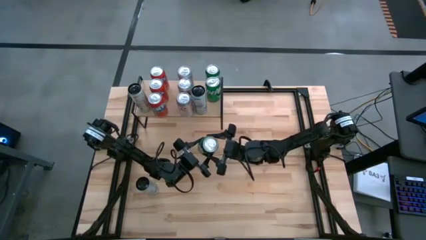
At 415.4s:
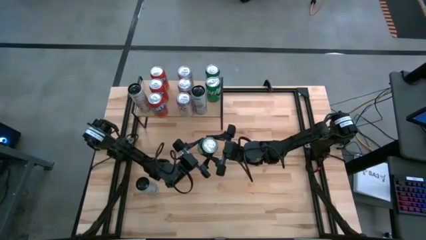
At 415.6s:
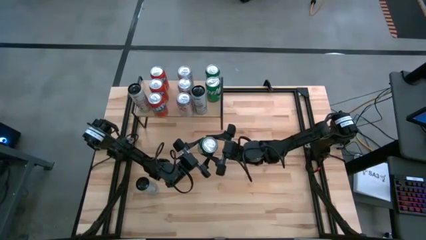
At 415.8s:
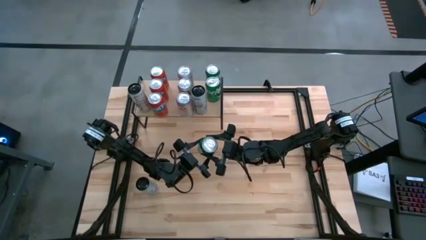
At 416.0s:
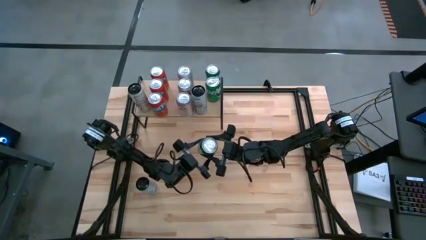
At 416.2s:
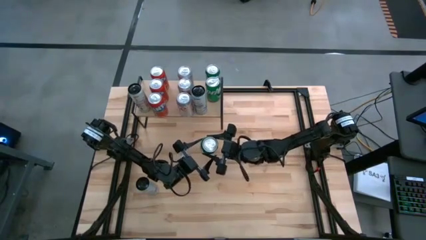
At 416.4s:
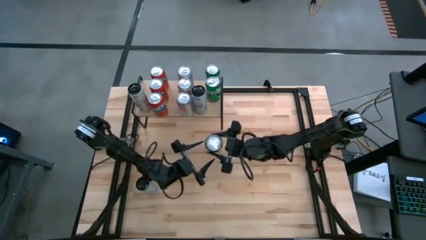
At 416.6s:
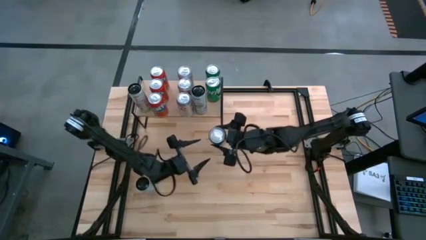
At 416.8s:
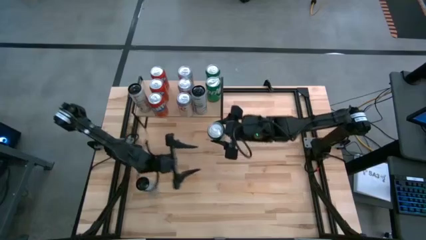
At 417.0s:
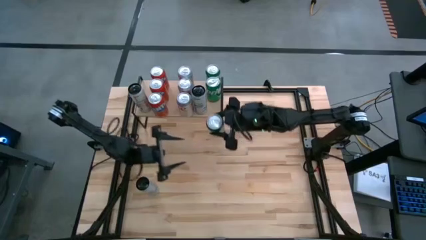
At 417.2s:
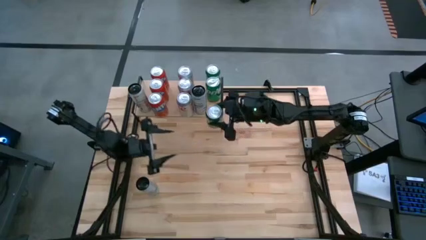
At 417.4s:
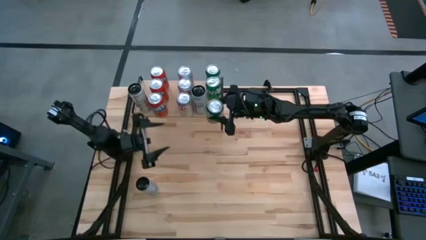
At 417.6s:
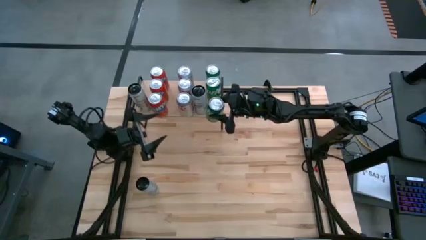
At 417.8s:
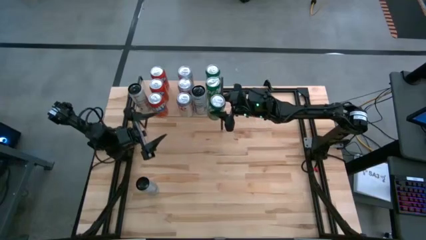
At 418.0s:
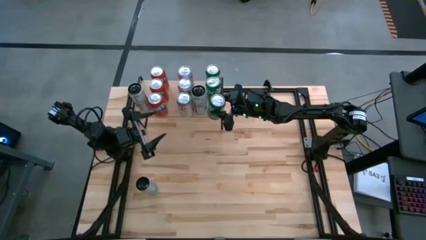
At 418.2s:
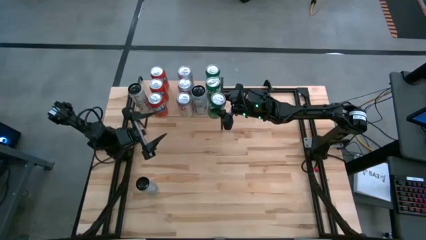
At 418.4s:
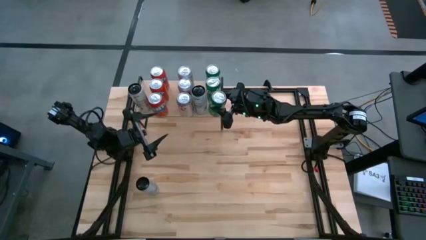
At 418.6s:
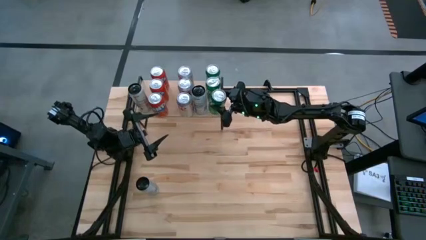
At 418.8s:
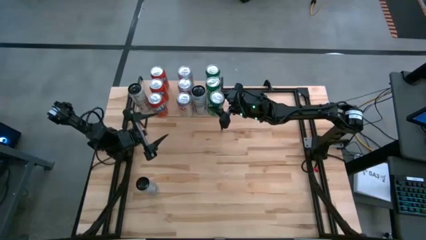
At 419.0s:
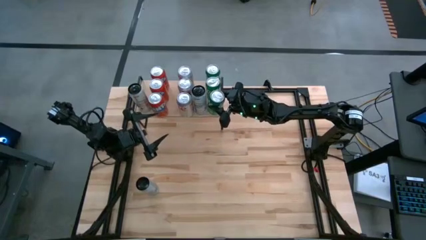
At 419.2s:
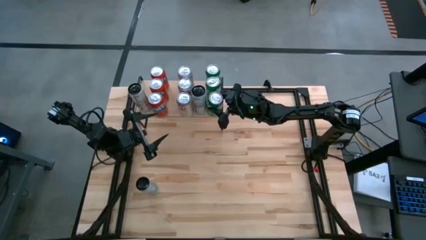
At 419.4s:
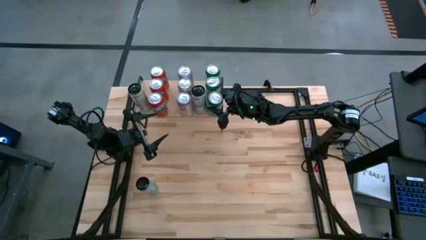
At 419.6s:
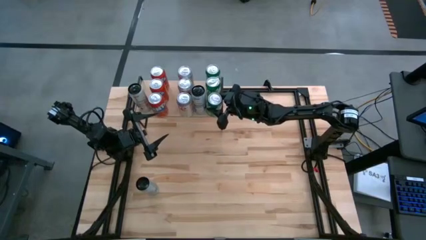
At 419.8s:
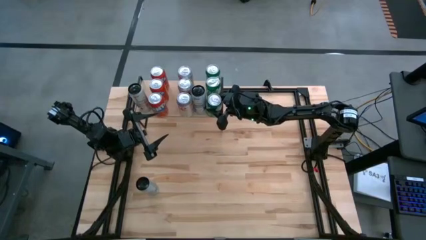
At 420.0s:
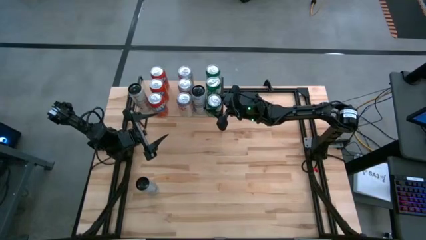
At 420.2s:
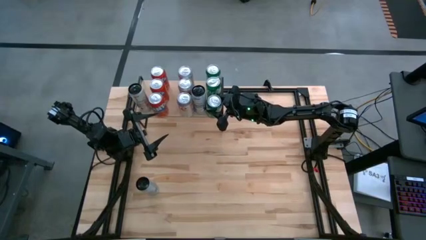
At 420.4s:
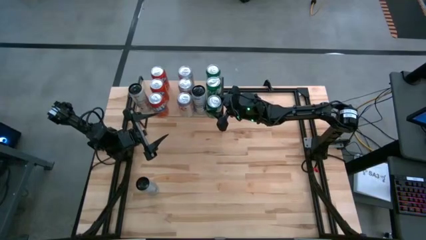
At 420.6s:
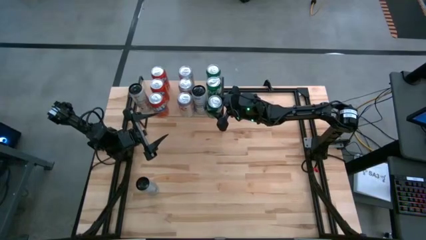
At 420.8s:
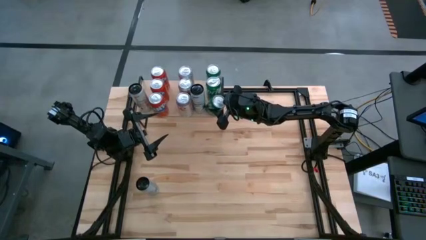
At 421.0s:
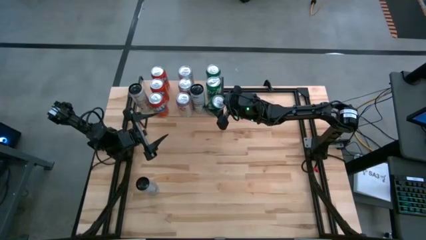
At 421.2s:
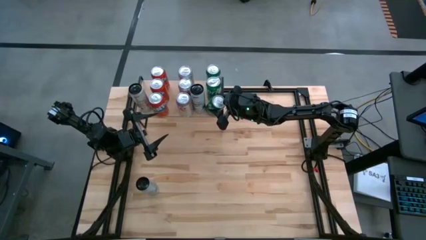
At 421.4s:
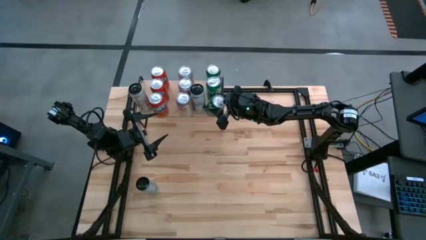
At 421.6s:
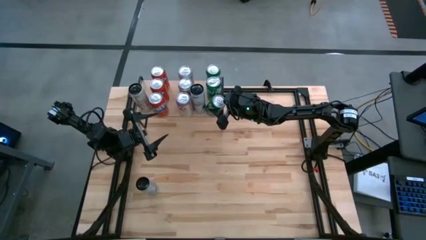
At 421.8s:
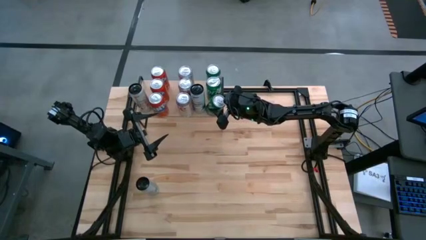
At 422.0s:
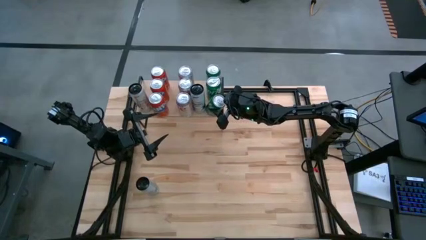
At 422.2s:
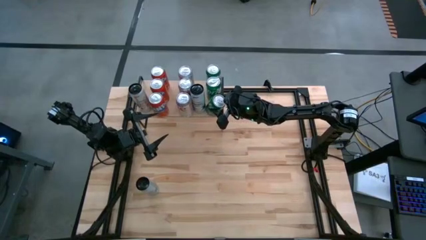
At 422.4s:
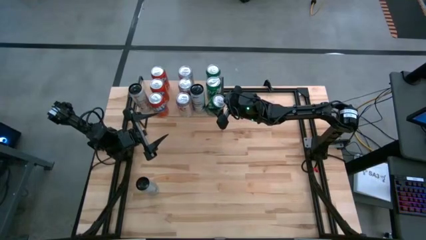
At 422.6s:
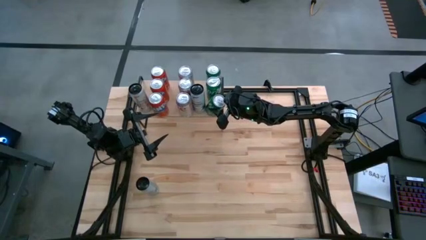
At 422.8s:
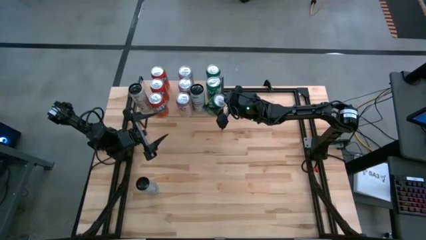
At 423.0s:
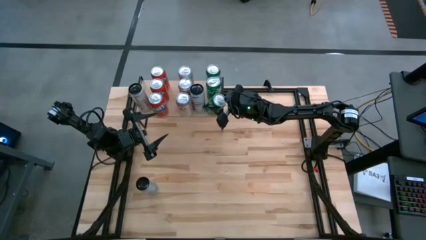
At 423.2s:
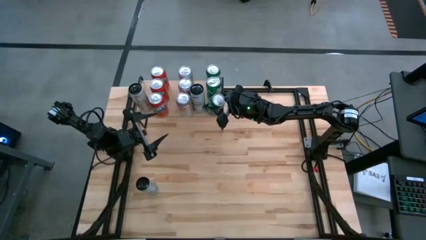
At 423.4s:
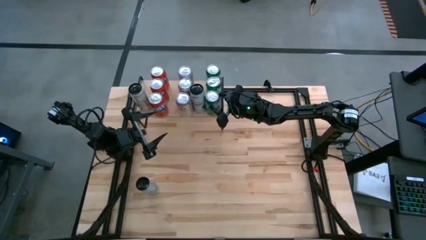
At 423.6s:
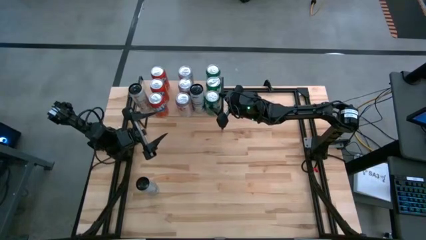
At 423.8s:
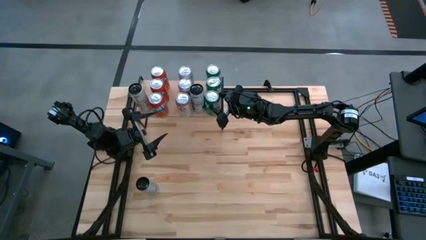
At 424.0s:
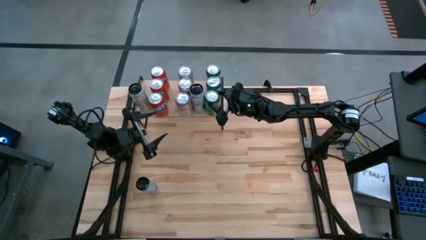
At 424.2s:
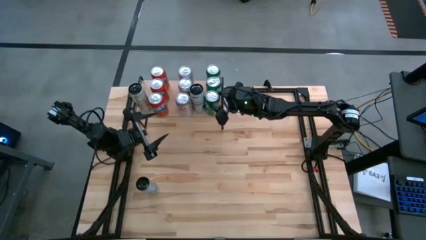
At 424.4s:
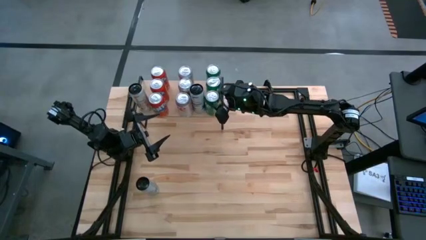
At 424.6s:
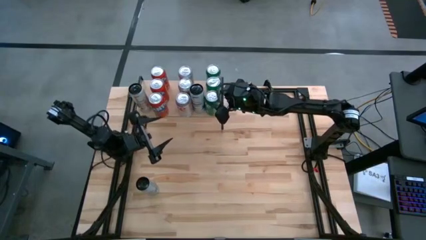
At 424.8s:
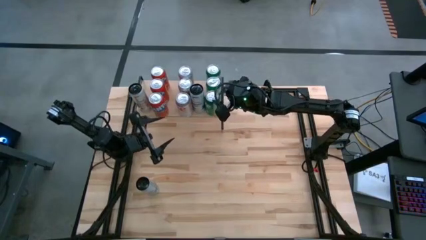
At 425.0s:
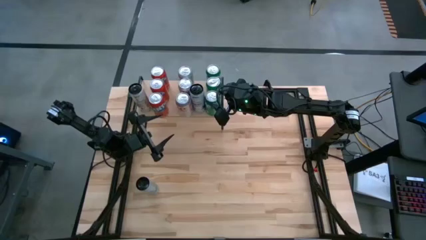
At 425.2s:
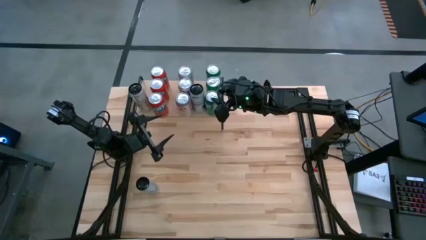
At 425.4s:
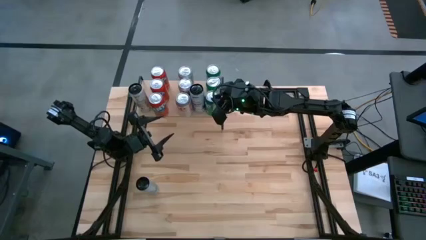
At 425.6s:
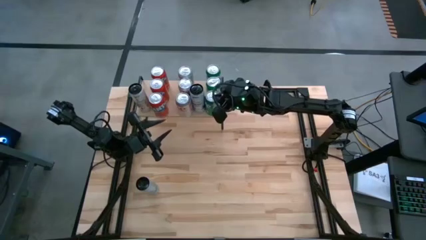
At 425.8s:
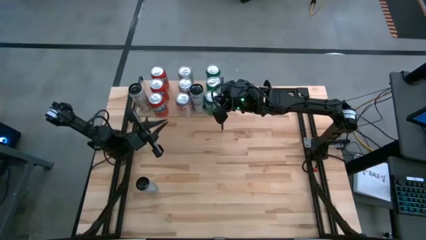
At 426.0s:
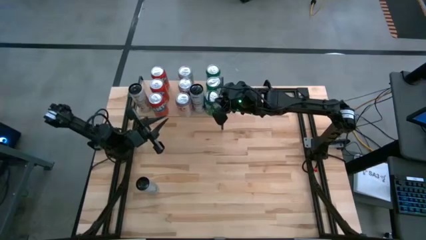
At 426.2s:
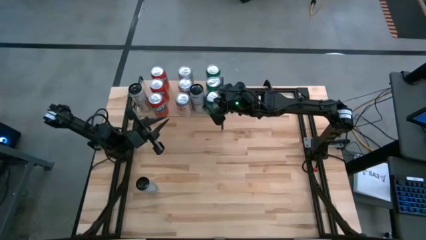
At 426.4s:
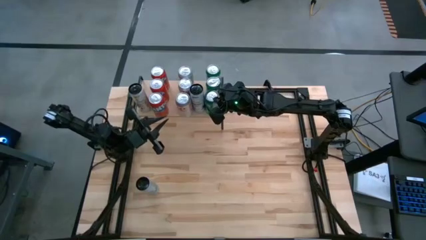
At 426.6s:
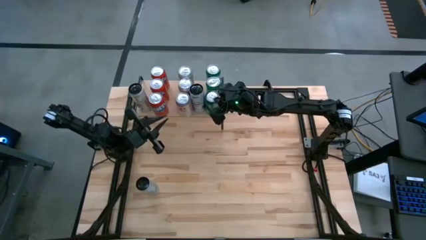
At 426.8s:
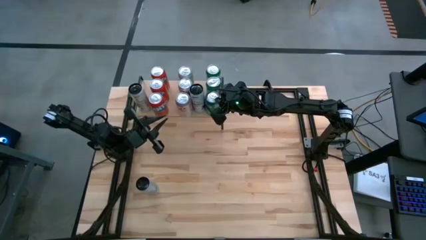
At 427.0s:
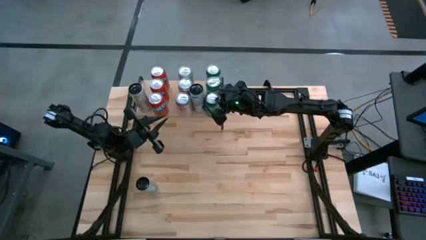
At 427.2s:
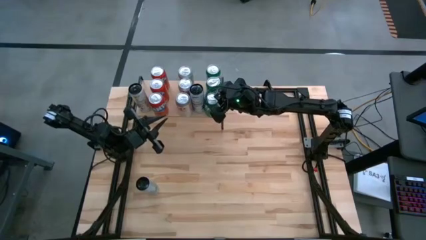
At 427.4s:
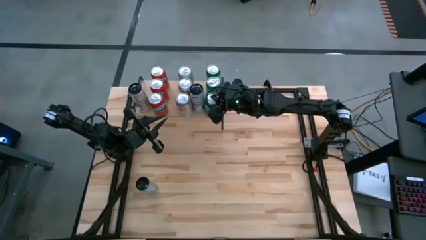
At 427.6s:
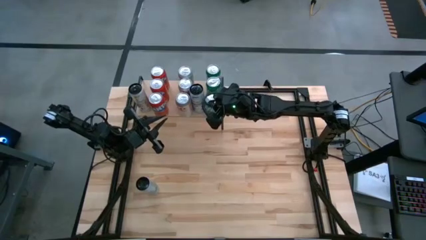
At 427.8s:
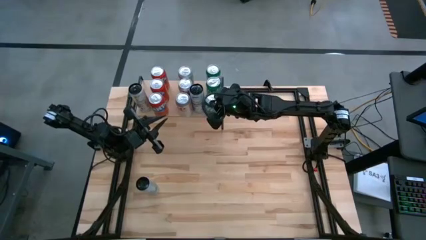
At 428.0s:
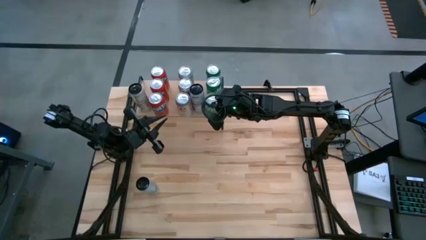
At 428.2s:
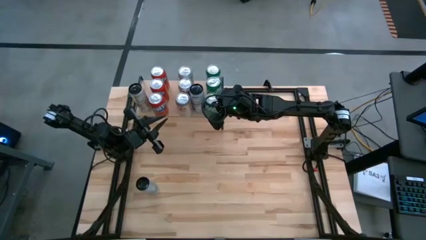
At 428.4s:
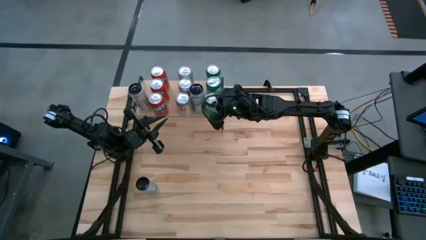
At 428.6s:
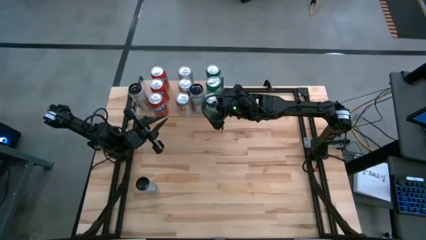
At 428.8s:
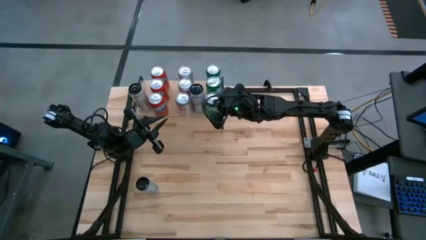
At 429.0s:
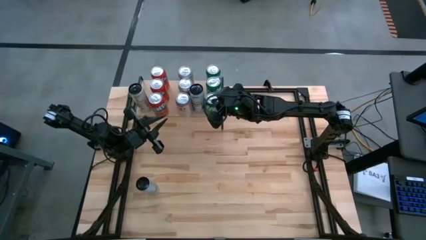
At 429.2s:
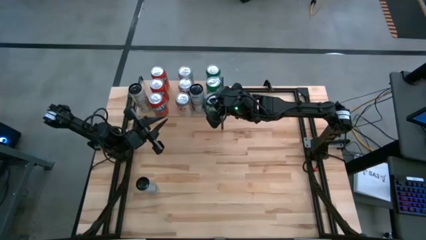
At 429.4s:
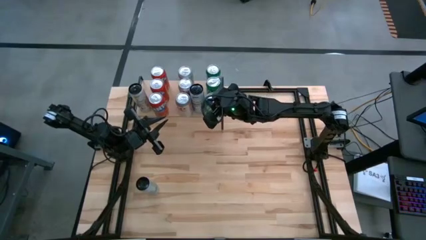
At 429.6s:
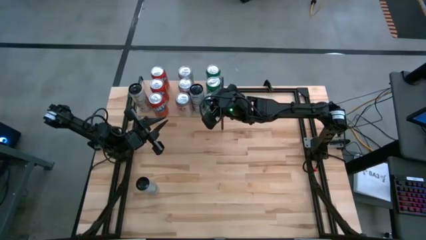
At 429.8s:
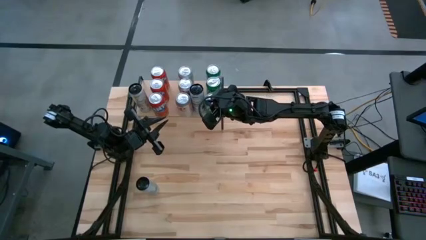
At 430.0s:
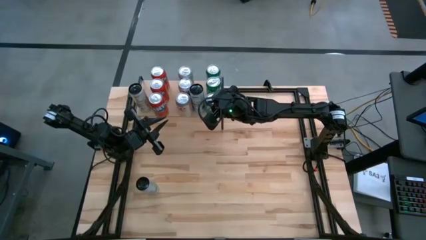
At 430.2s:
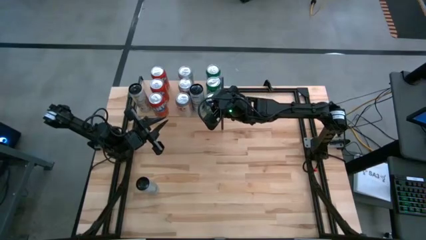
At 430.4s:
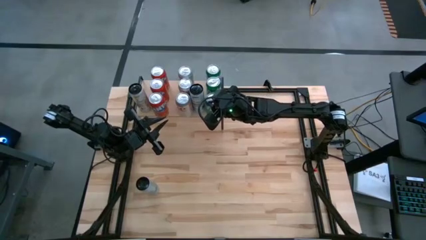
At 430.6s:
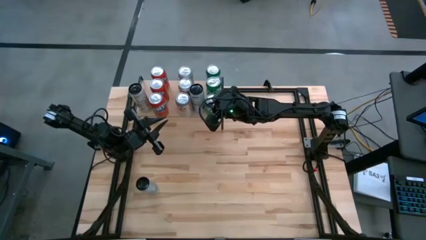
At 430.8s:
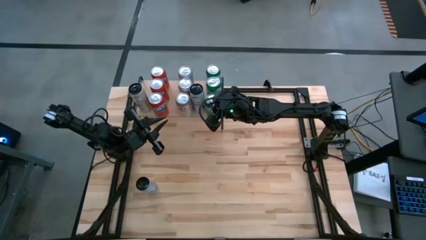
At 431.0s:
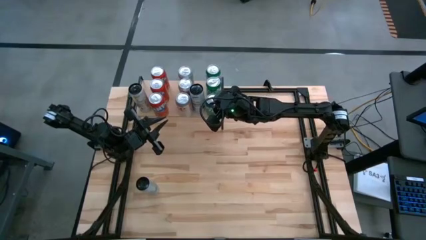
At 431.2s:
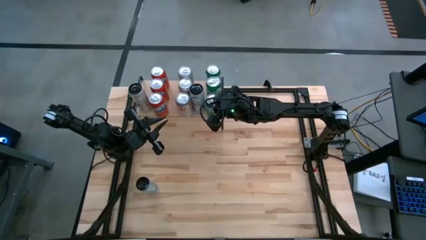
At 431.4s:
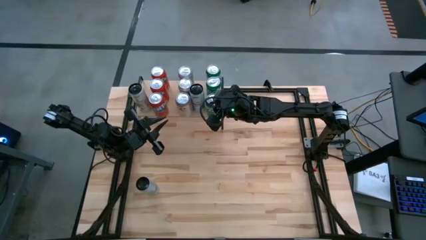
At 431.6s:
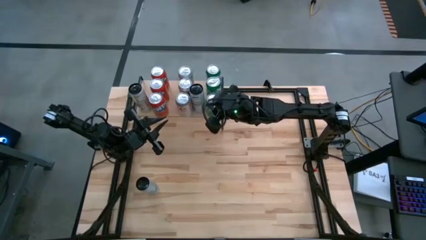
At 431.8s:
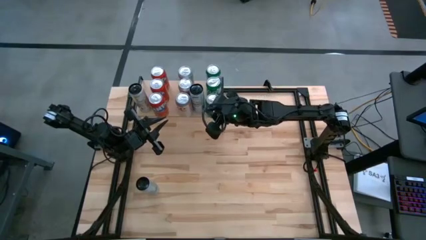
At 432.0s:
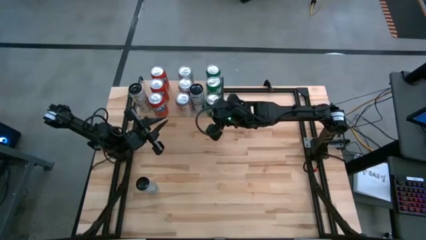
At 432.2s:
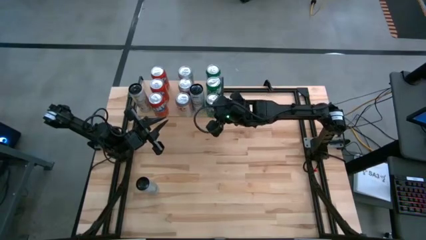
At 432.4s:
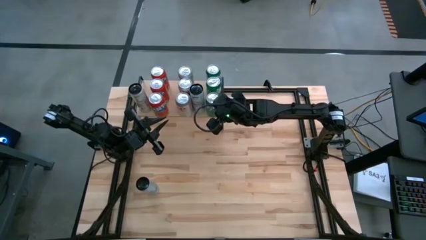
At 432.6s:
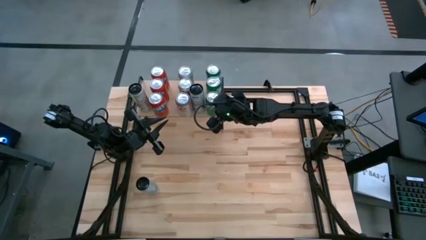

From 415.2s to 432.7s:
Task: Place canned beverage on shelf
Put the green soda can aligned with the other green soda cans on the shelf
